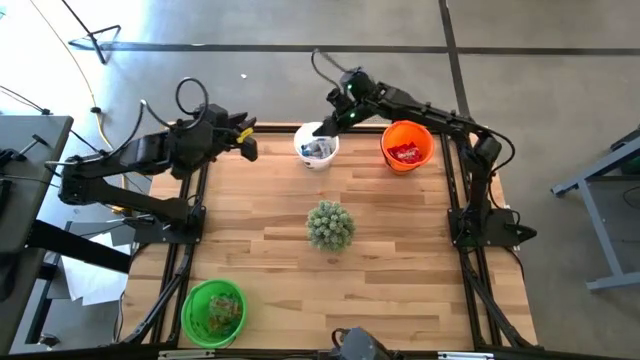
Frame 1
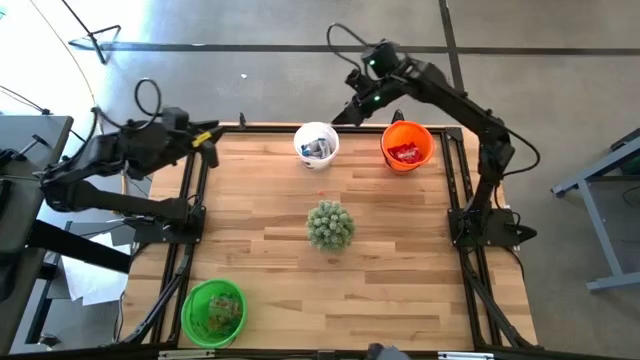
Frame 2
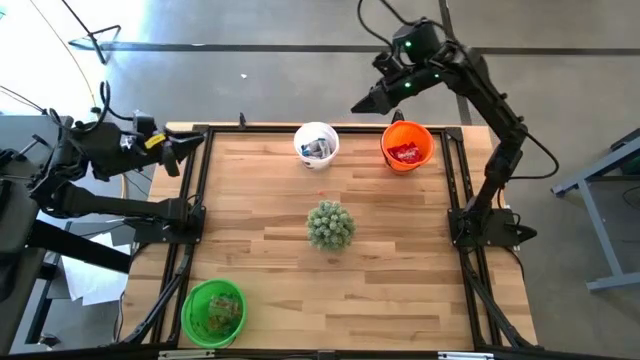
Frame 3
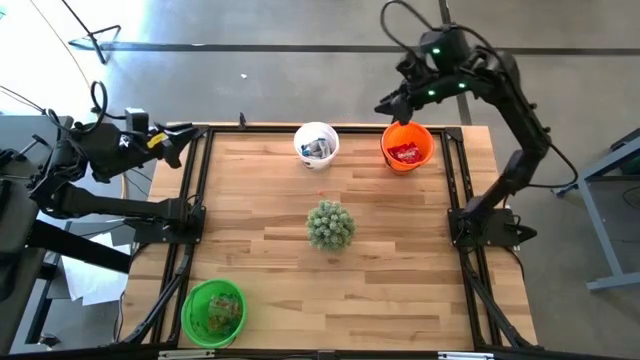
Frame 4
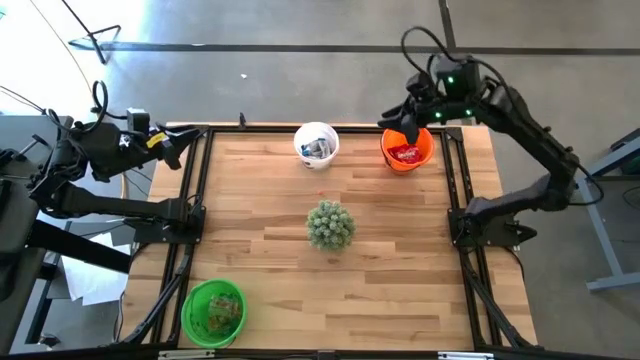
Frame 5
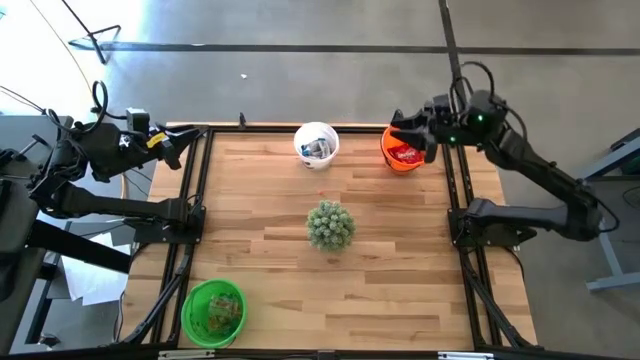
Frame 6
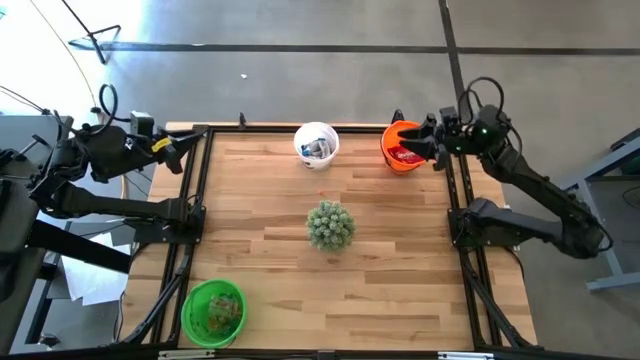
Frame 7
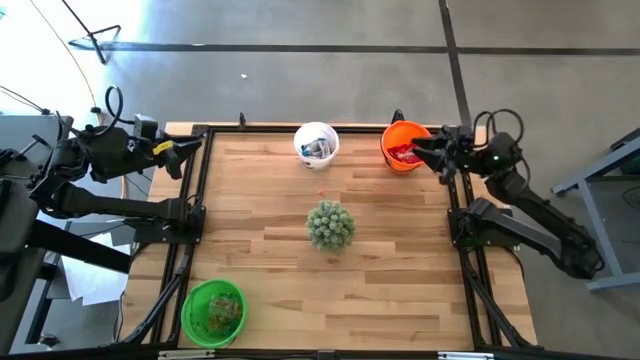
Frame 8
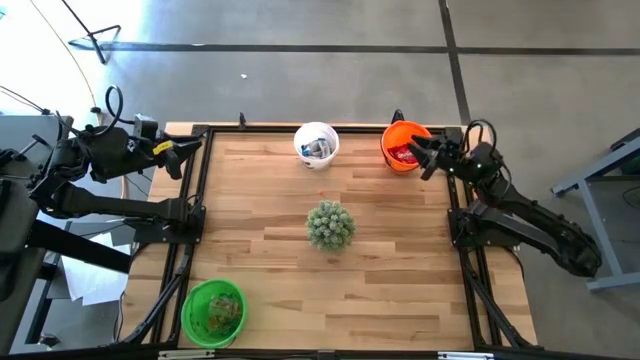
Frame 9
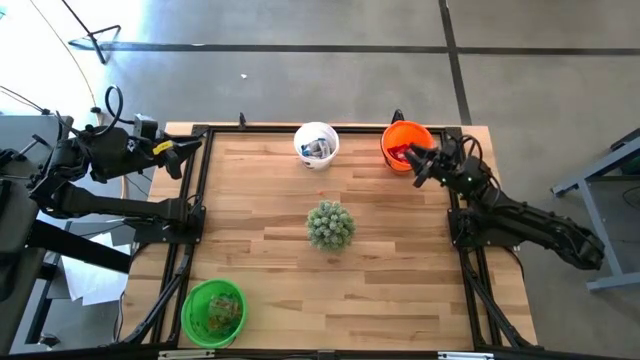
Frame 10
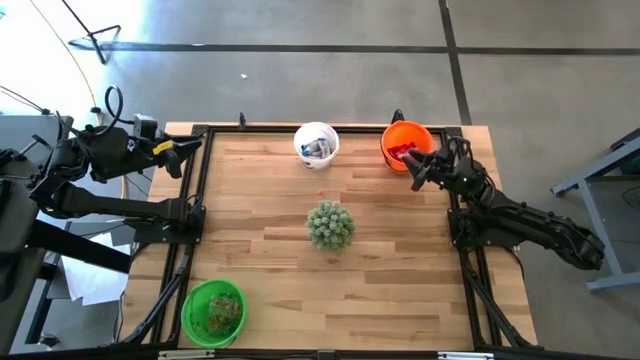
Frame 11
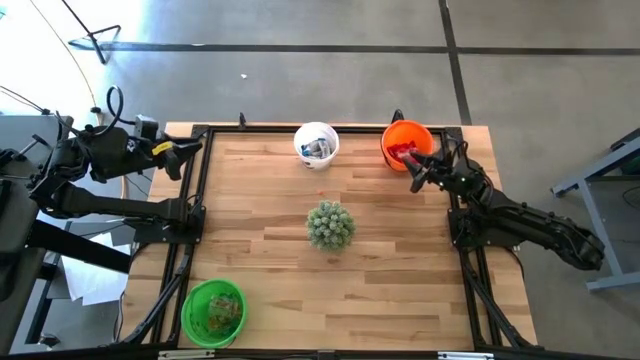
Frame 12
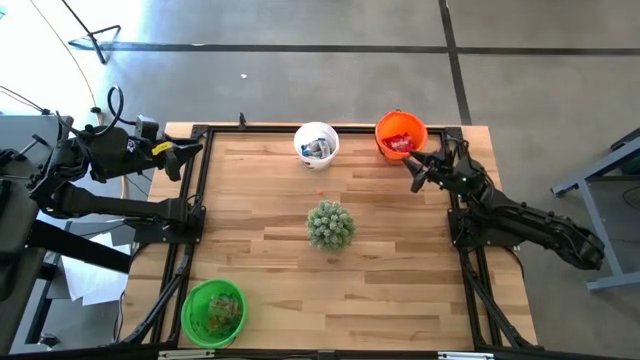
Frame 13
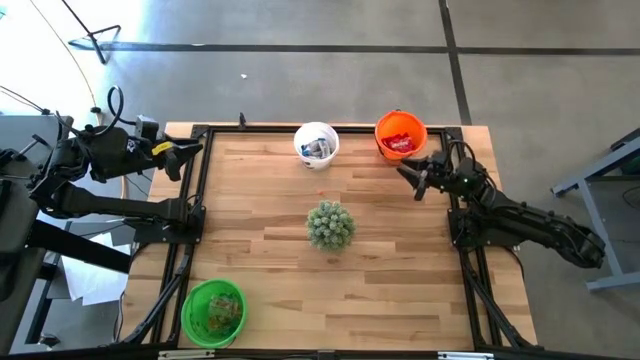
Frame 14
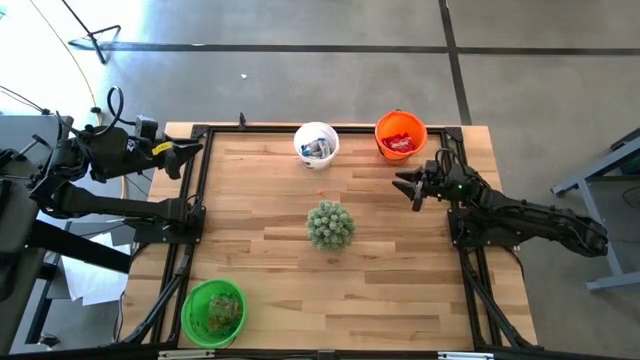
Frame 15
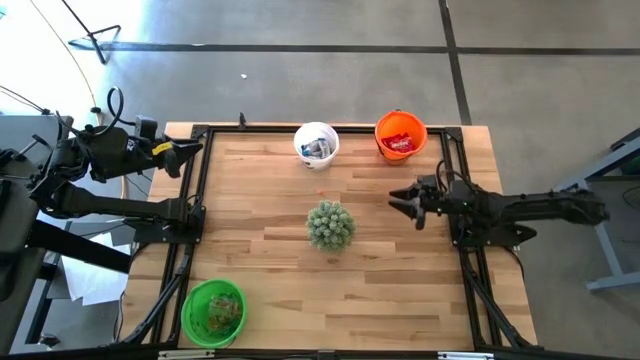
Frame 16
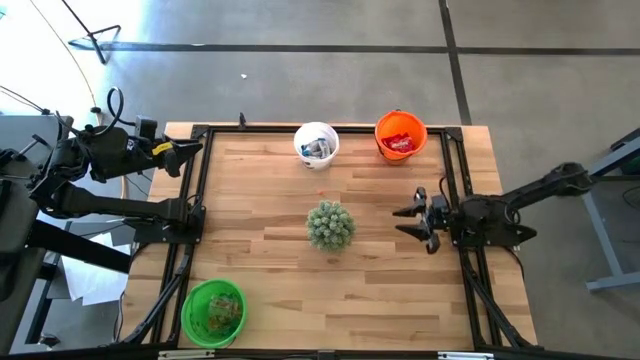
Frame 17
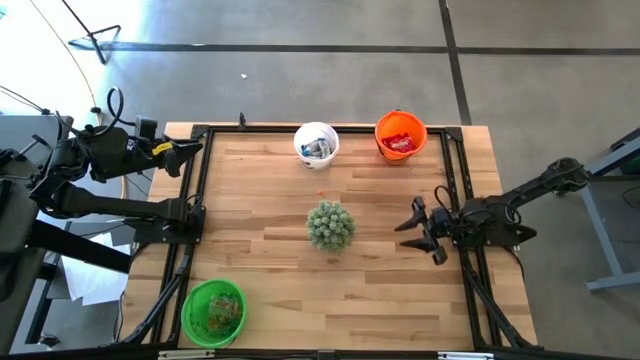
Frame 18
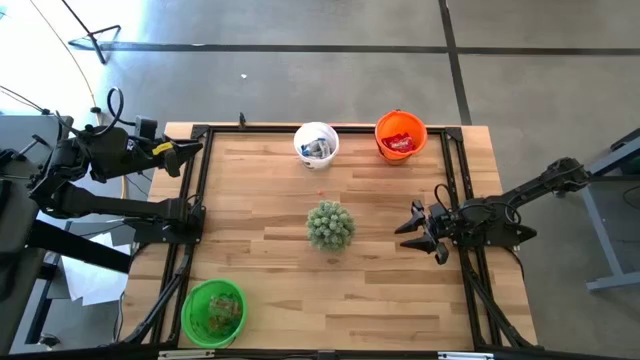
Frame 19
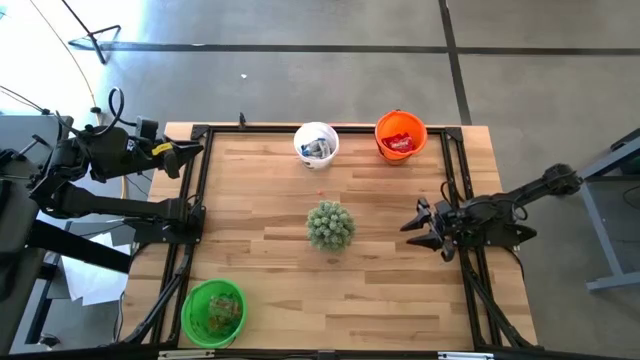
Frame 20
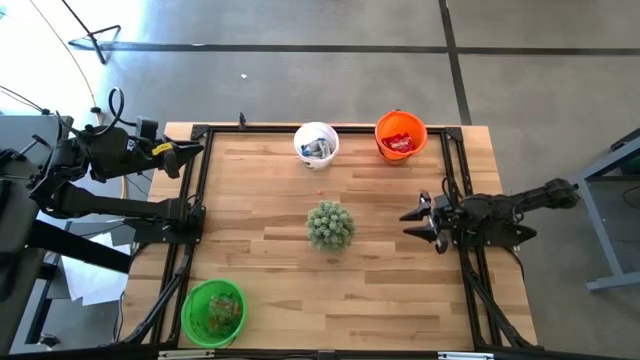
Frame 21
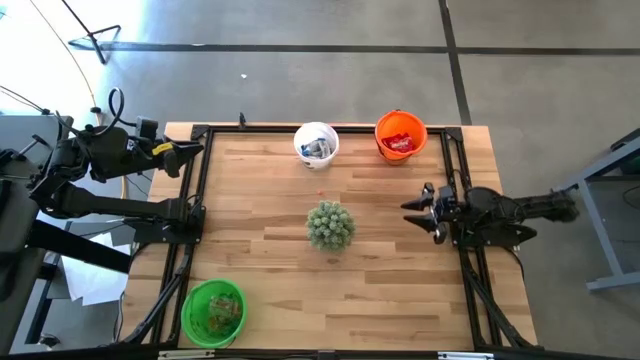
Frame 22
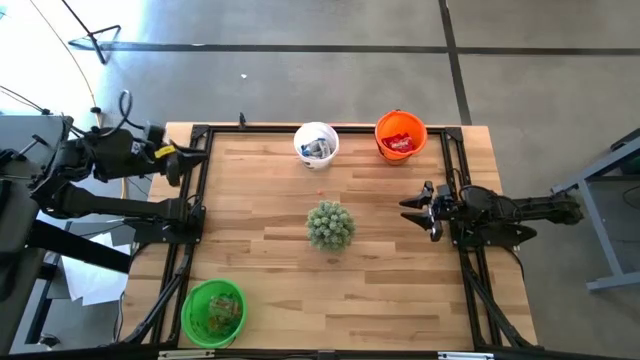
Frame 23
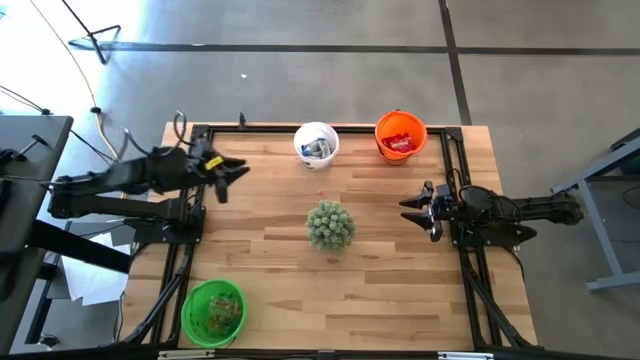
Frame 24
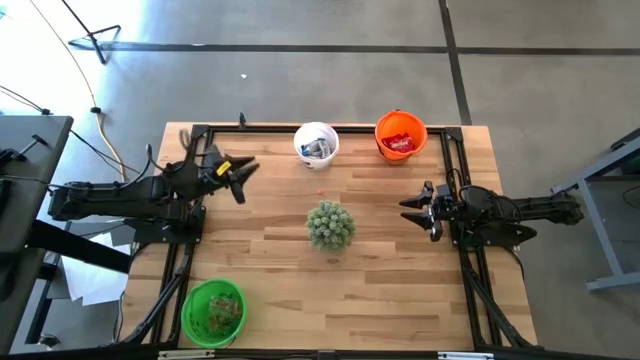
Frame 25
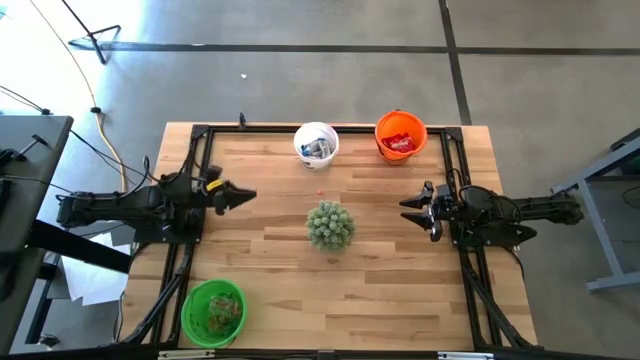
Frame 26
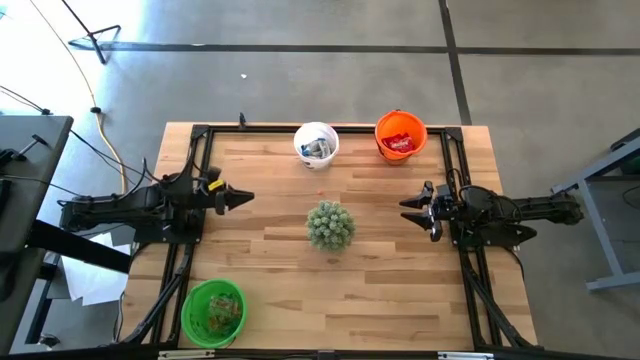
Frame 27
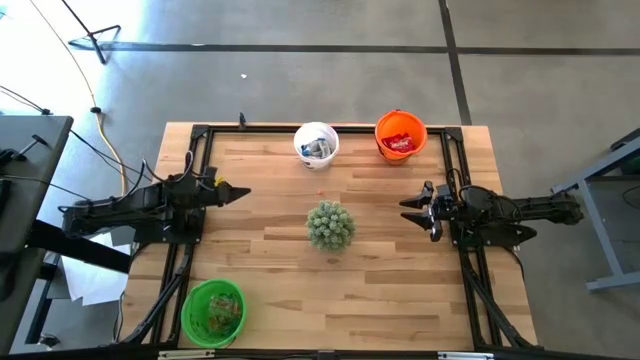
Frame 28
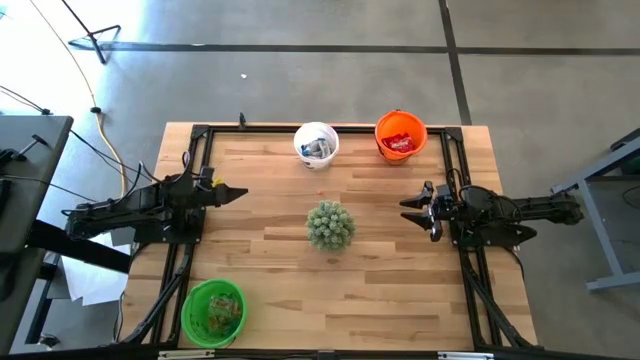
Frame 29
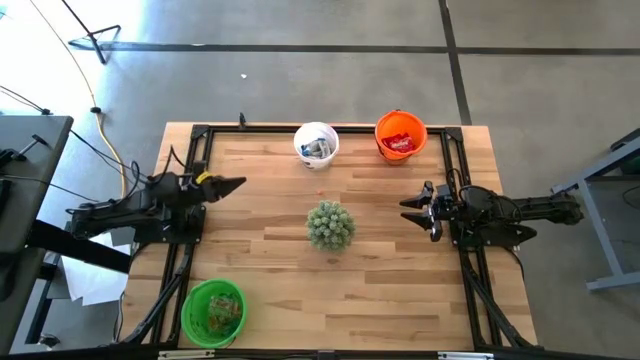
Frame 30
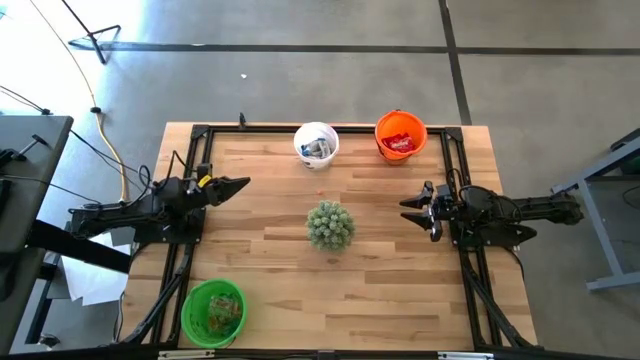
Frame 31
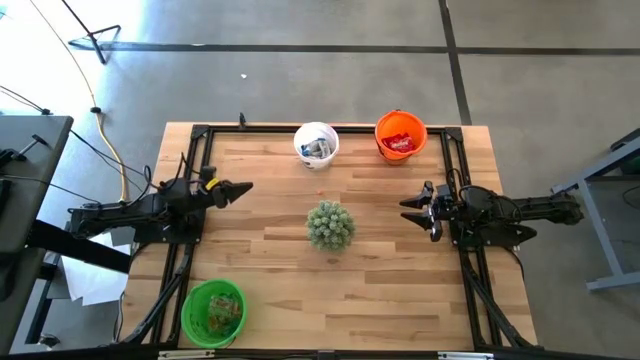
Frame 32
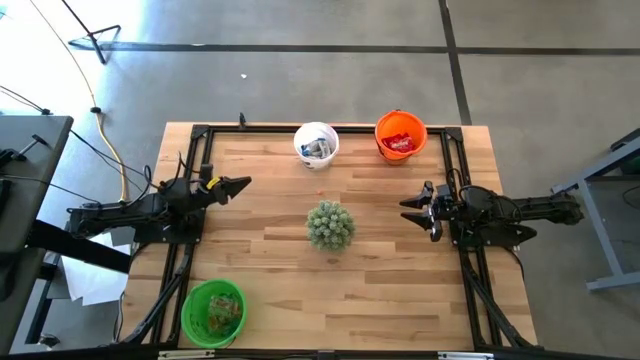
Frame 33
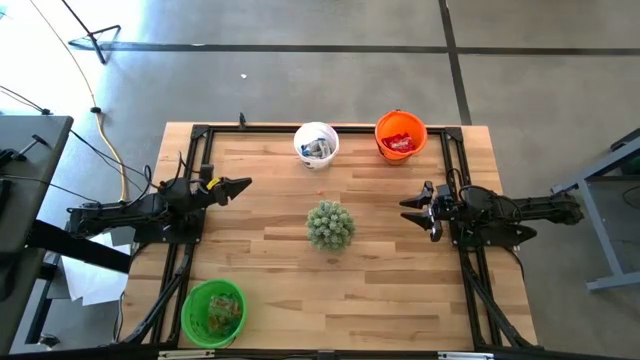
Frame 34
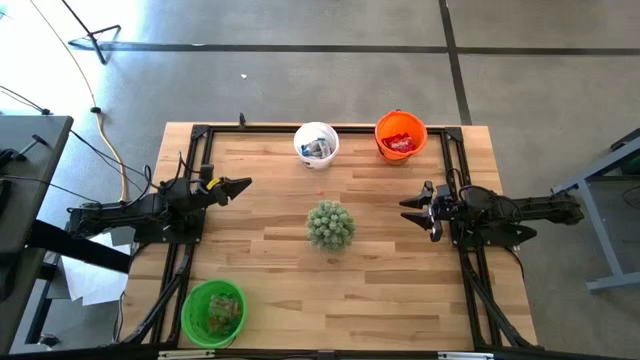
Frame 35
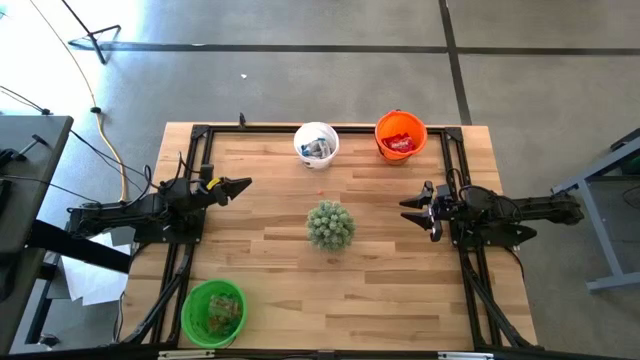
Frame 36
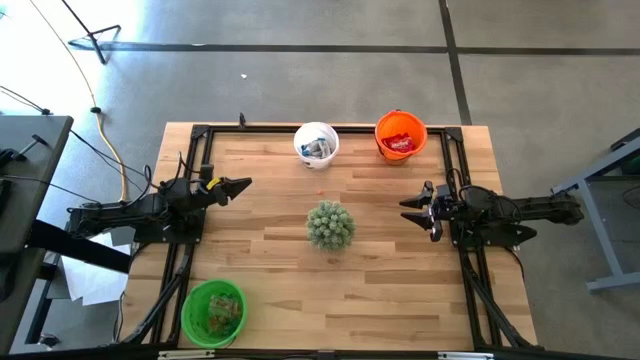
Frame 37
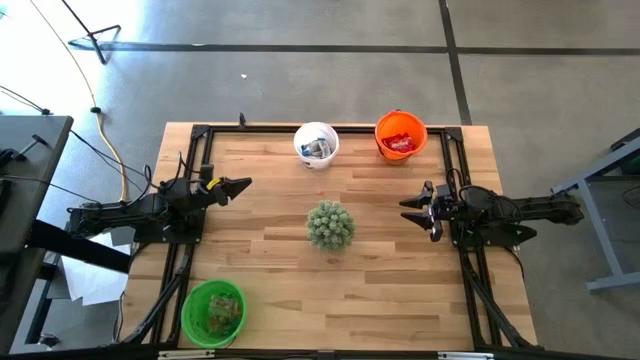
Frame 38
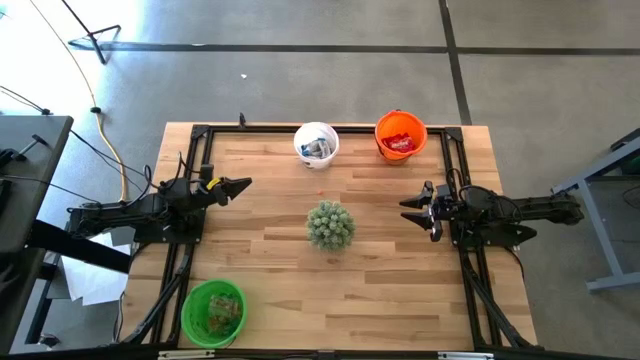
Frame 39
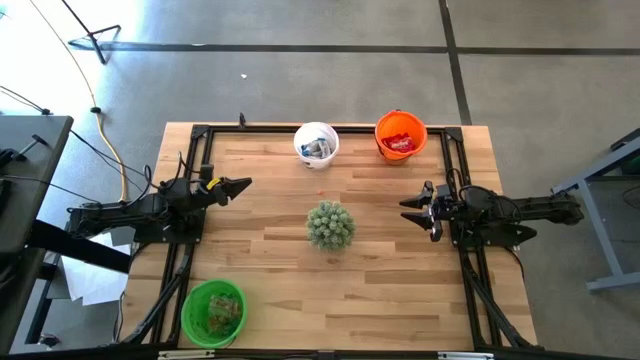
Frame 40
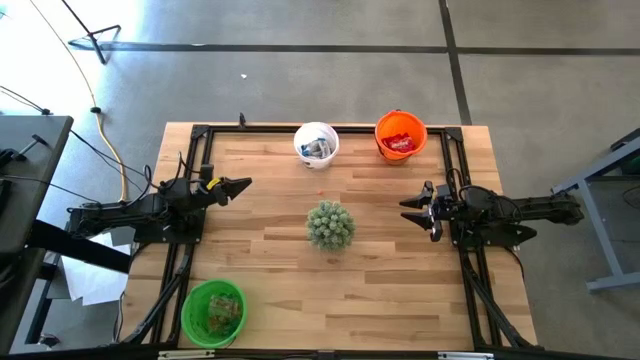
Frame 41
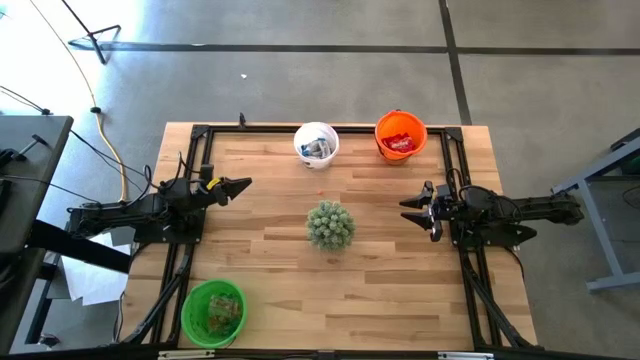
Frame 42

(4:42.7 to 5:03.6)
Task: Sort candy
Return to Home Position

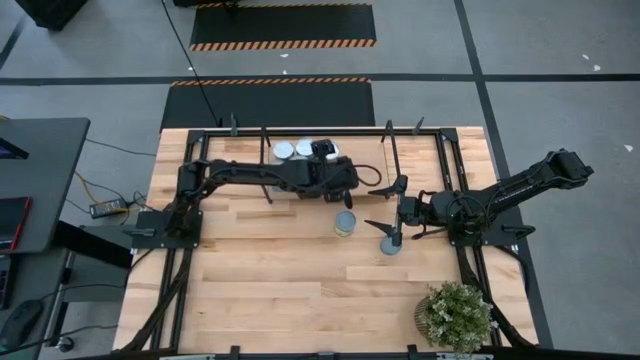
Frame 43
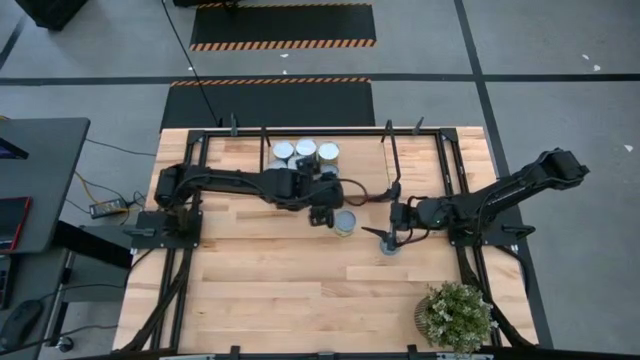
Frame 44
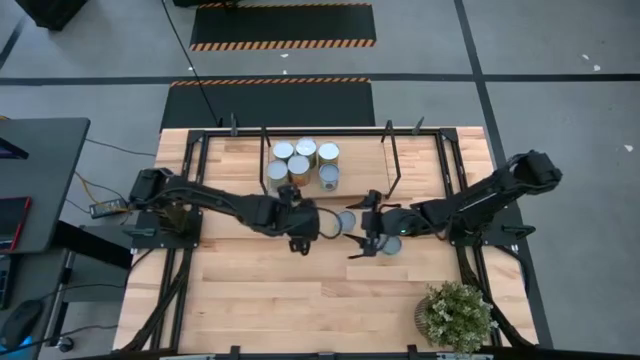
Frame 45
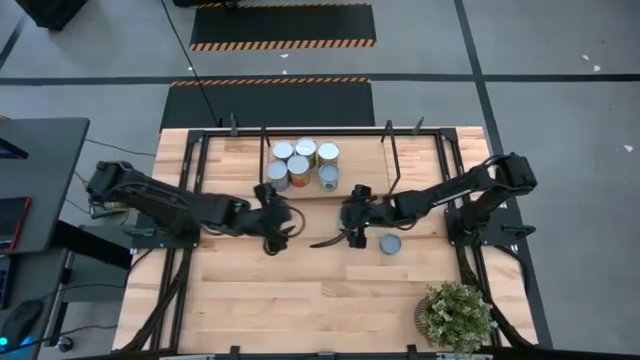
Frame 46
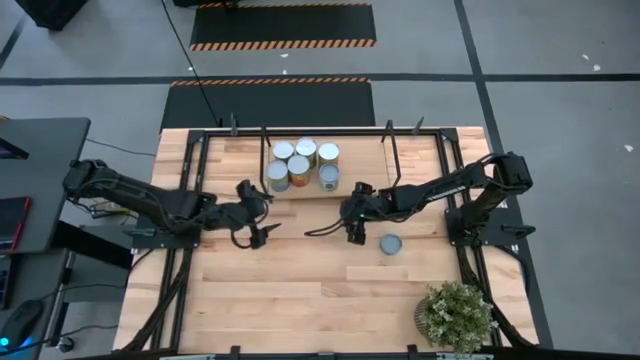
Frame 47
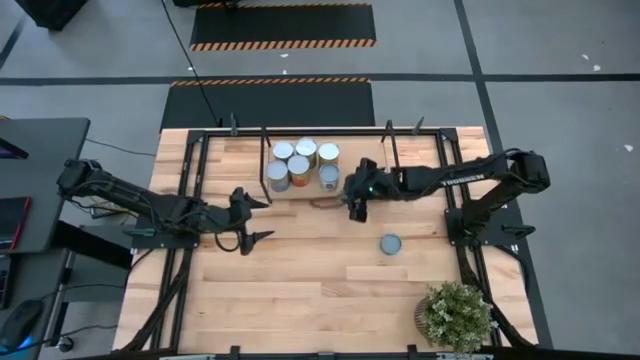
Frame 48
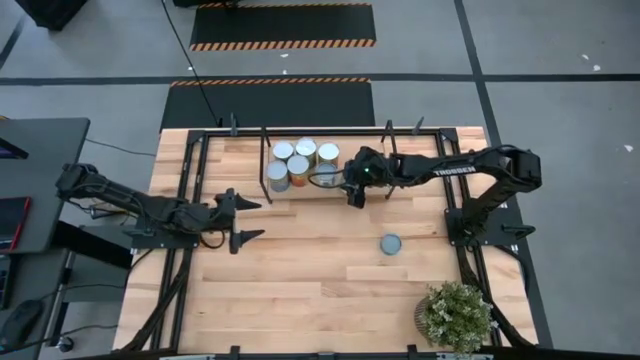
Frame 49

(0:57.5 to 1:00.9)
Task: Pick and place cans onto a shelf
Put the canned chicken soup on the shelf
